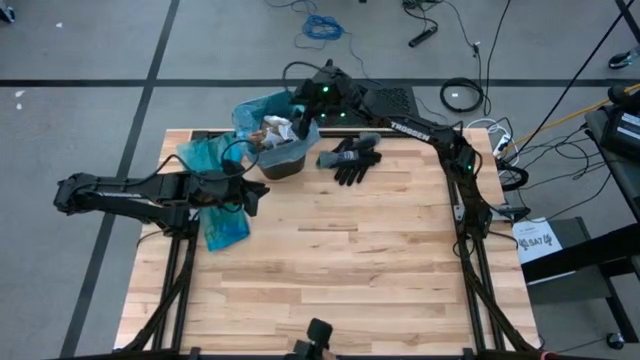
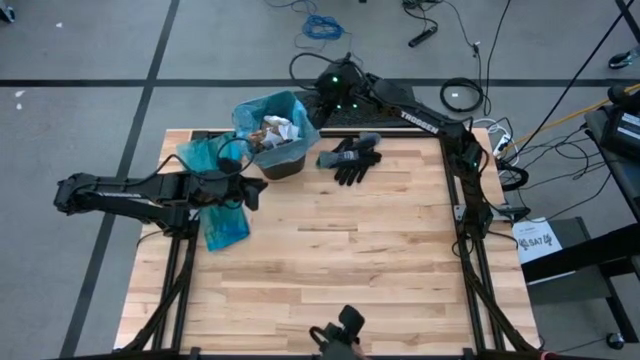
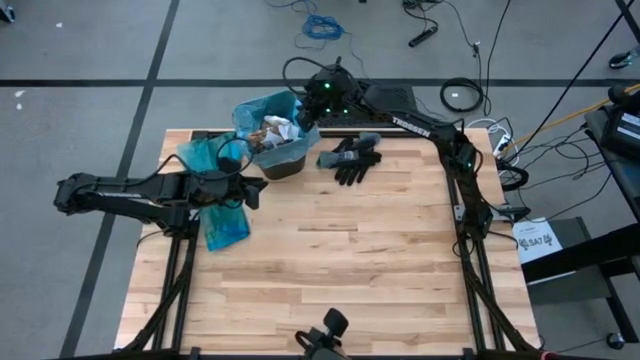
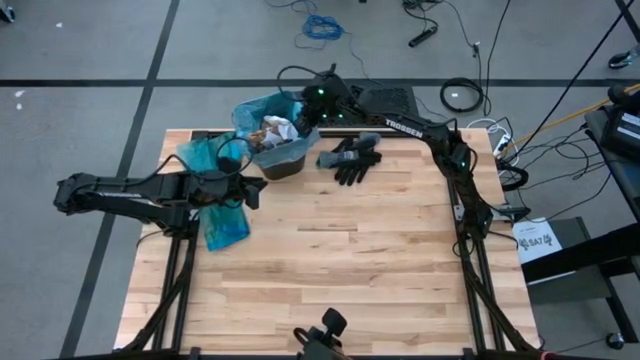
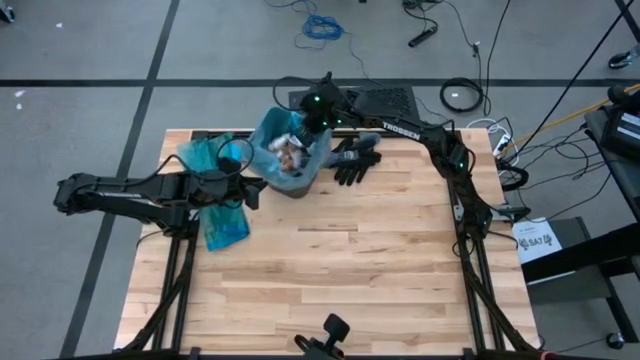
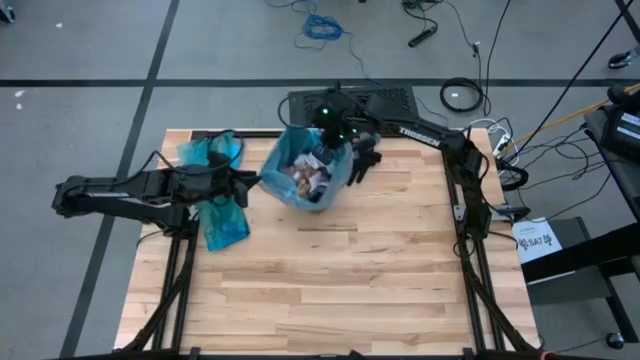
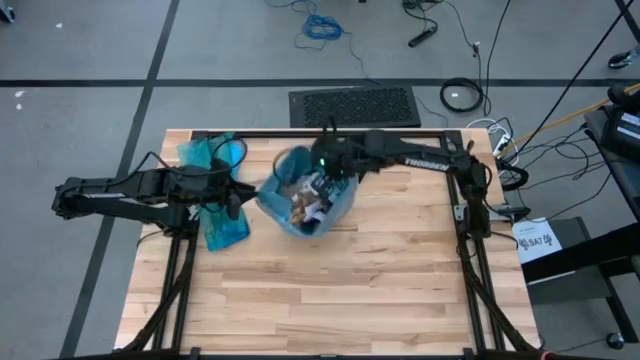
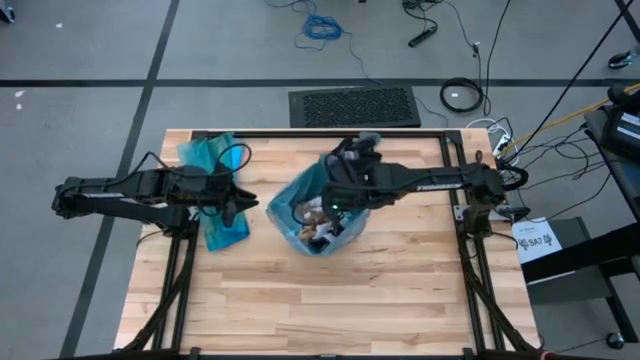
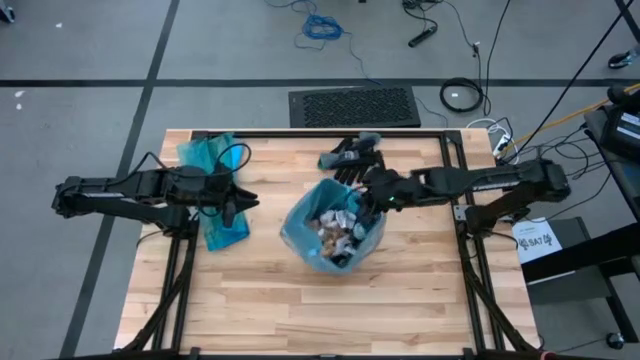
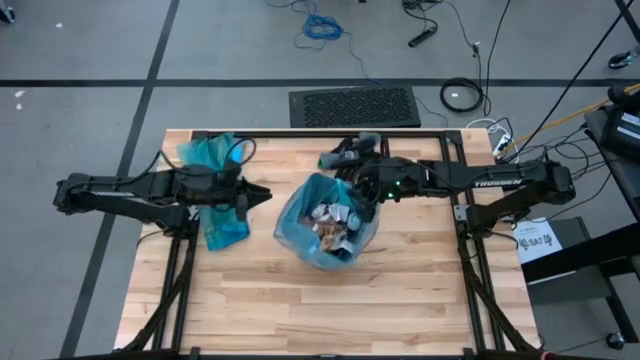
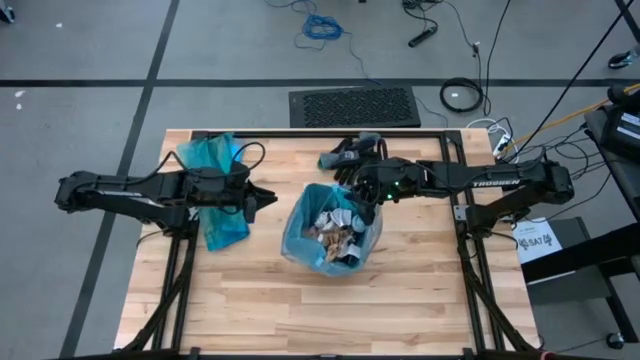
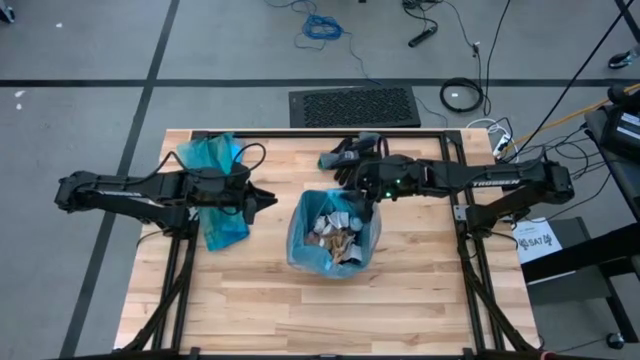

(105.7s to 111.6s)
Task: place trash/remove bag and relplace
Move the blue trash bin to the center

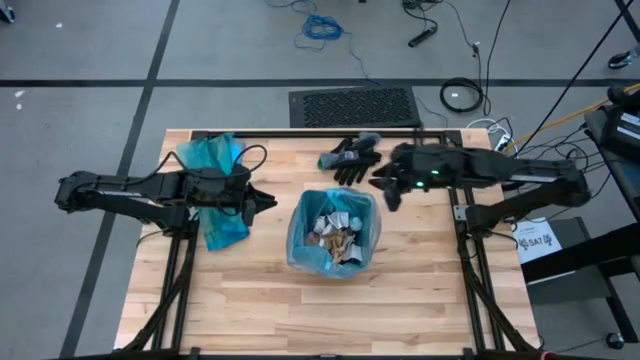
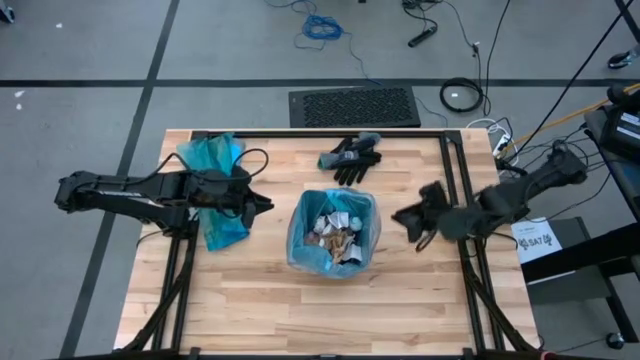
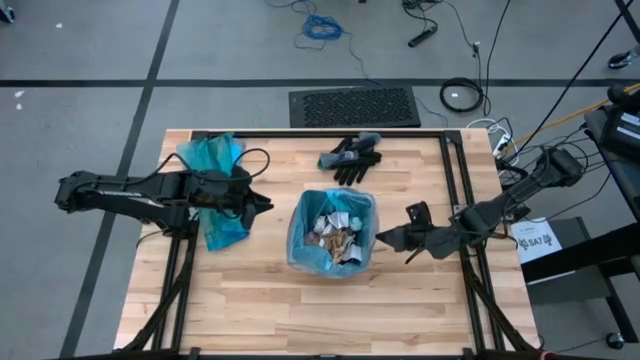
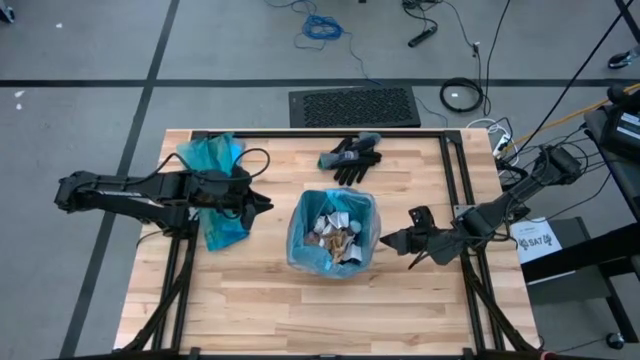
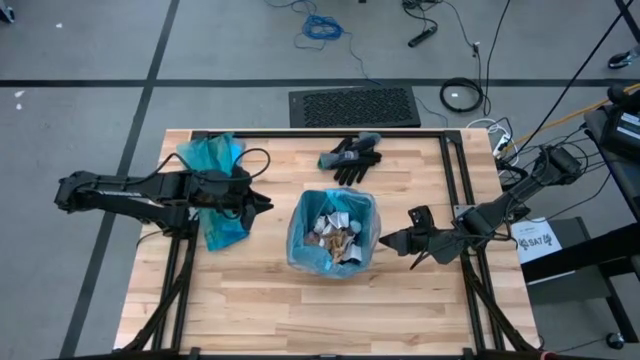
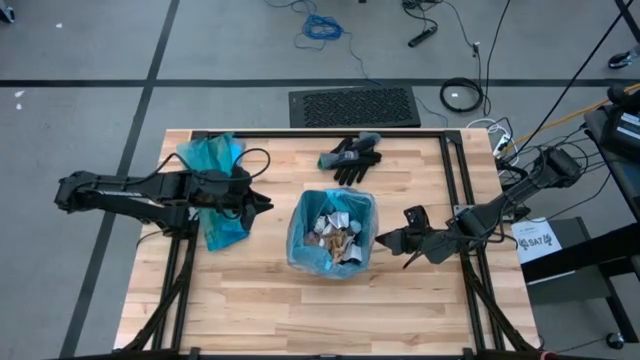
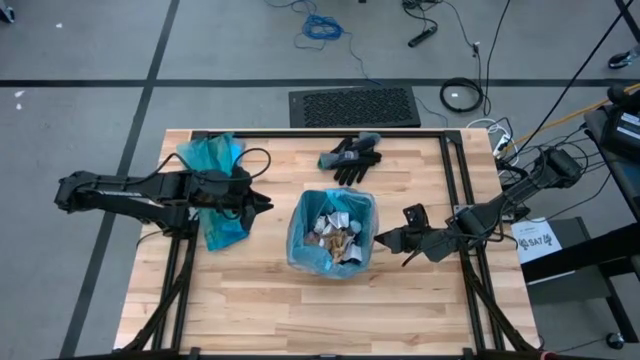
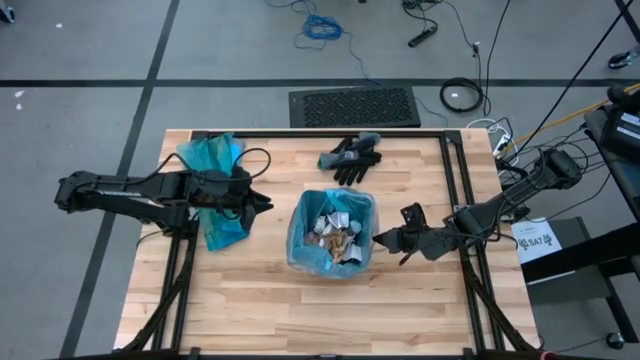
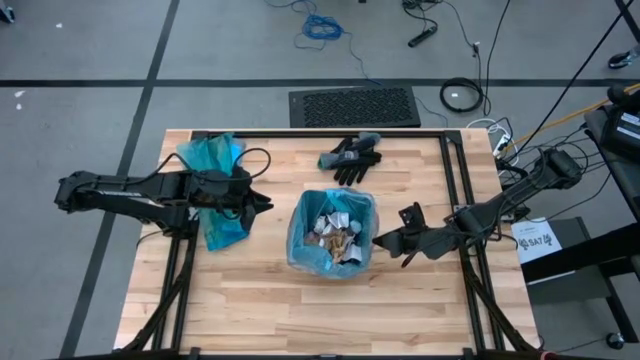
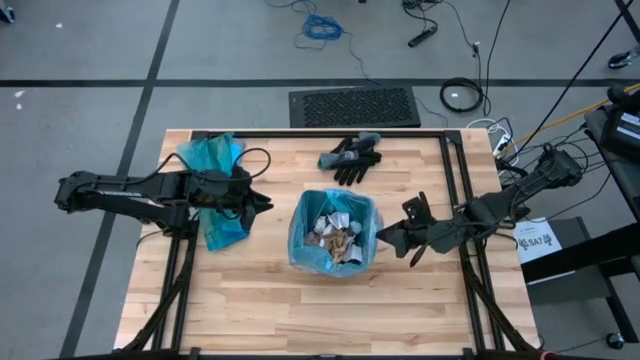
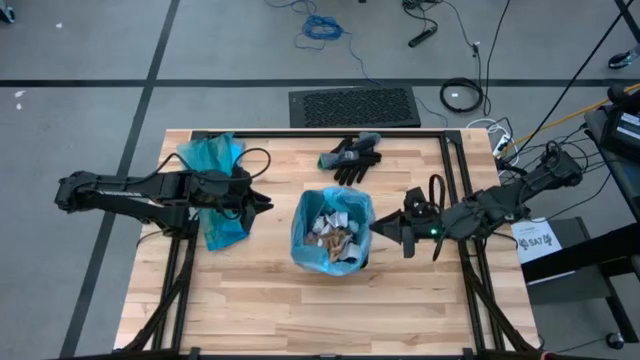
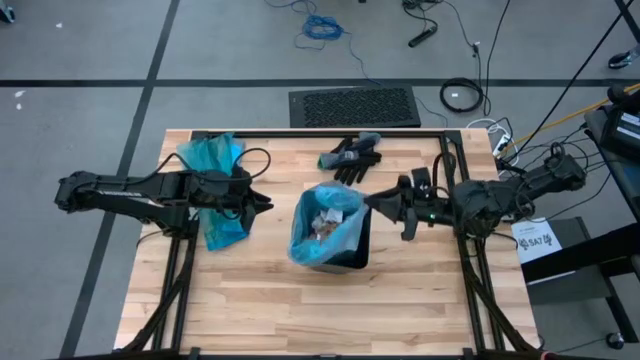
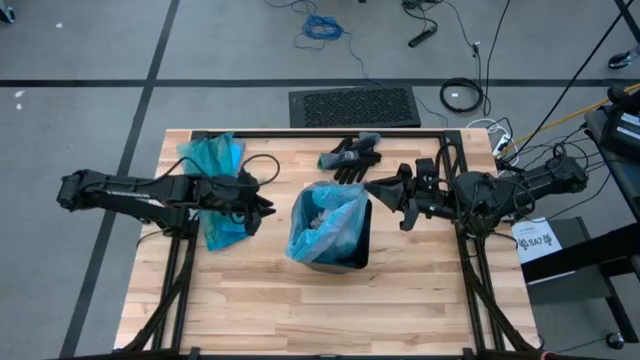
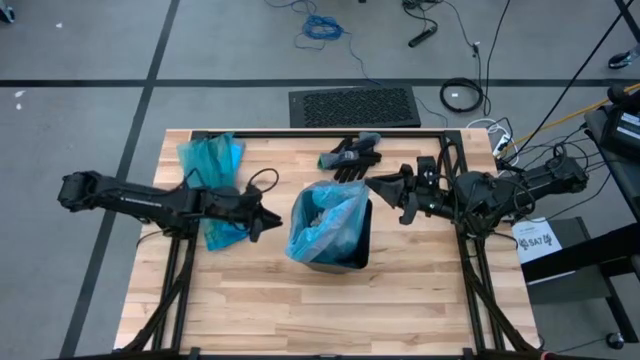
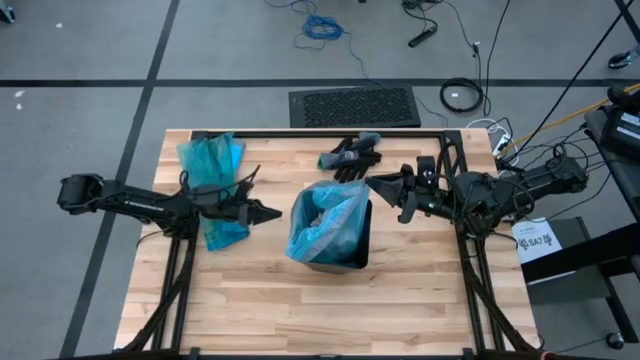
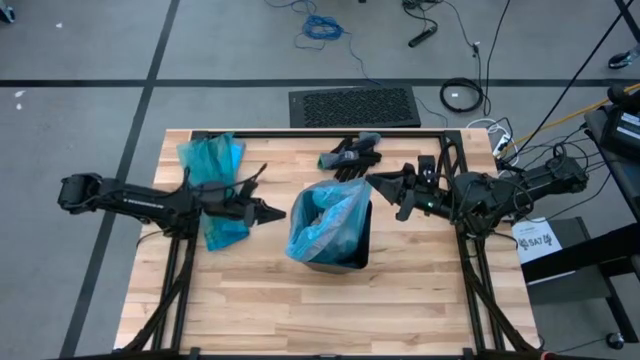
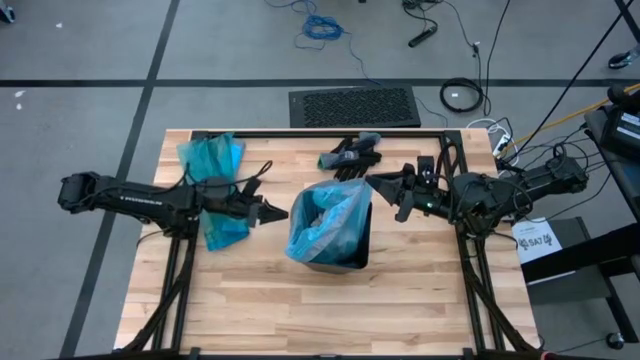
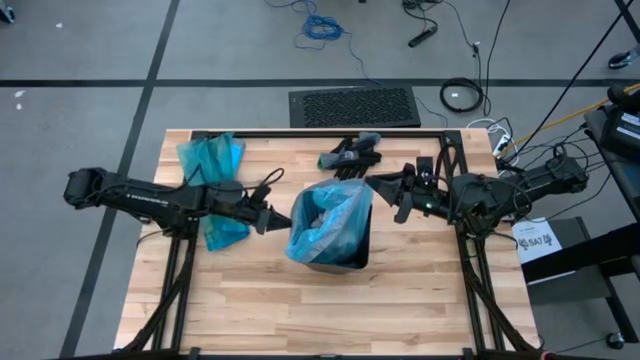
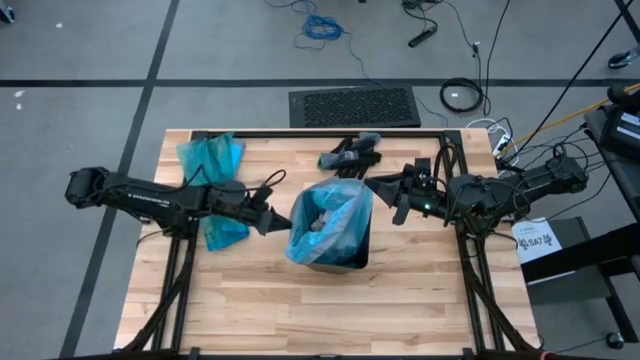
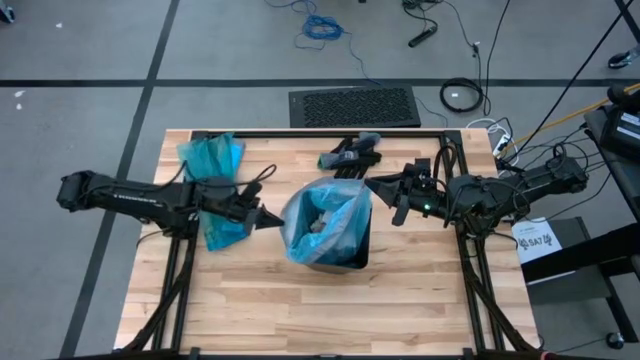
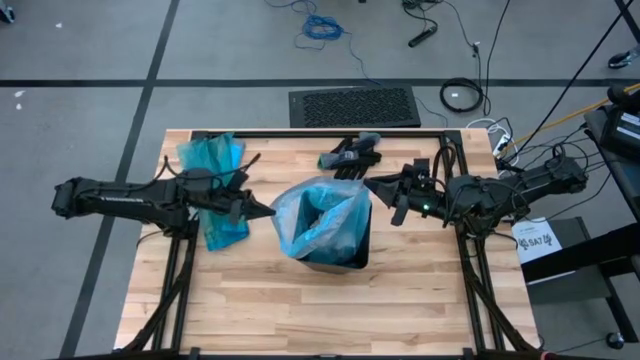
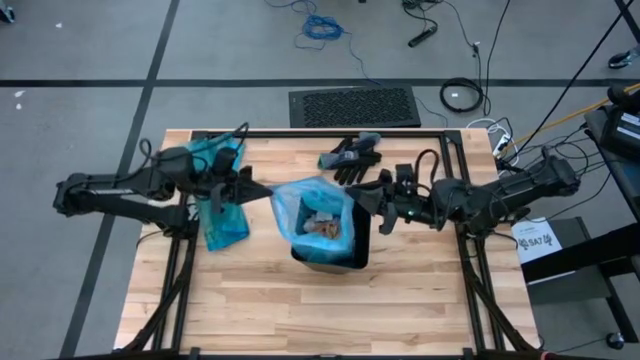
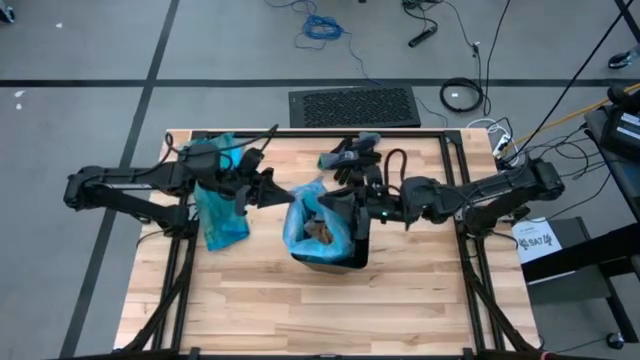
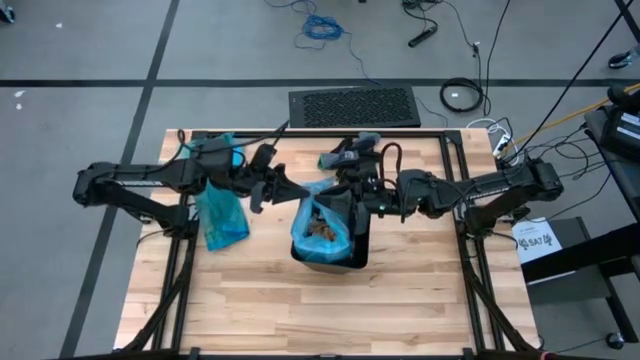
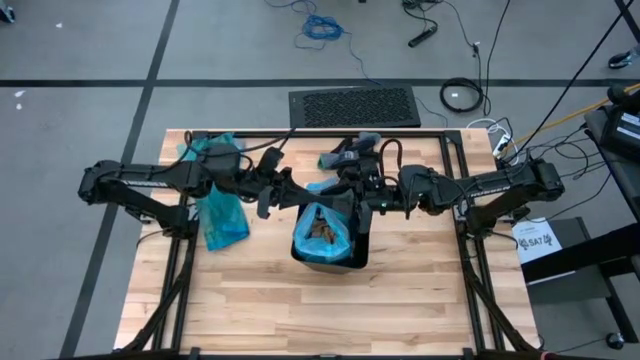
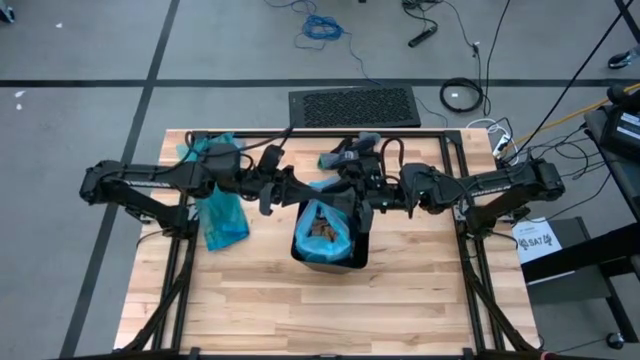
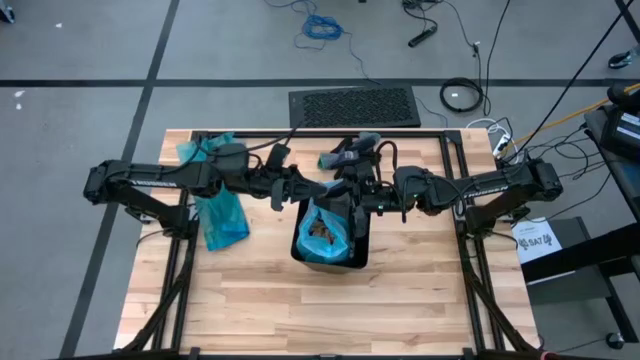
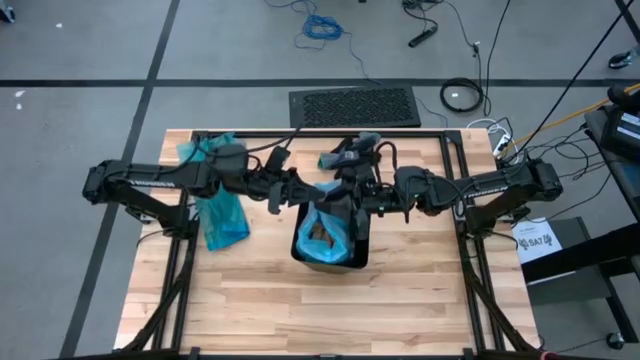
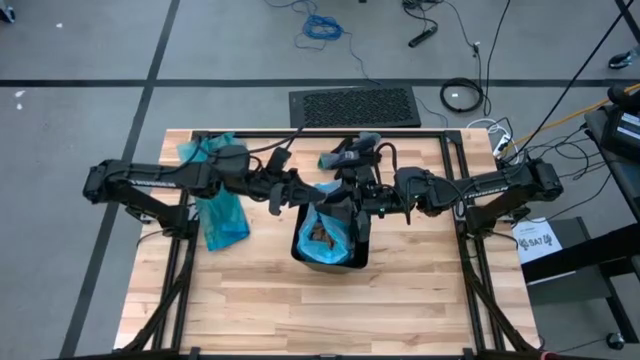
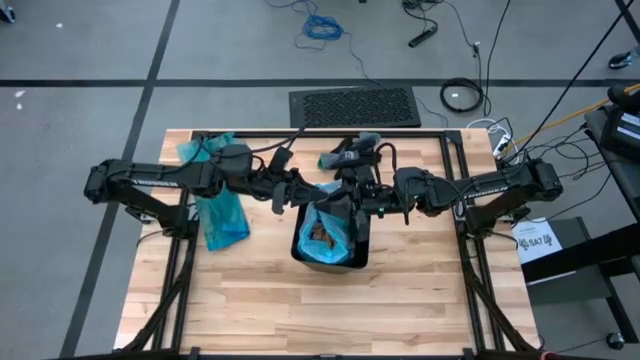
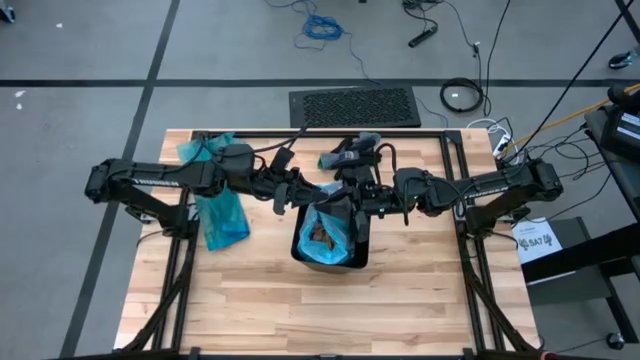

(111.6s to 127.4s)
Remove the blue trash bag from the bin
